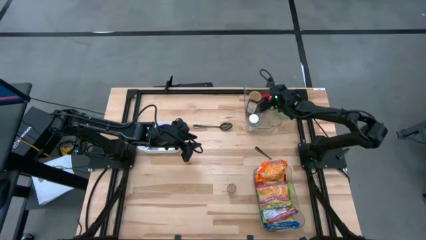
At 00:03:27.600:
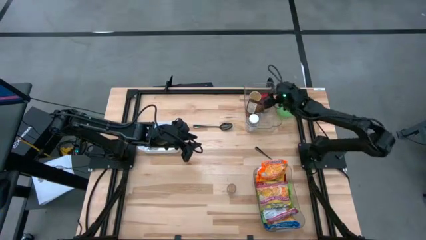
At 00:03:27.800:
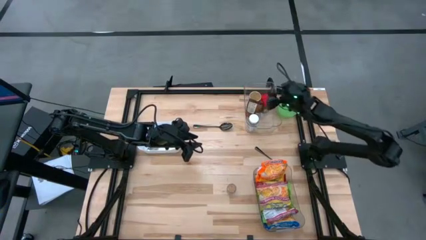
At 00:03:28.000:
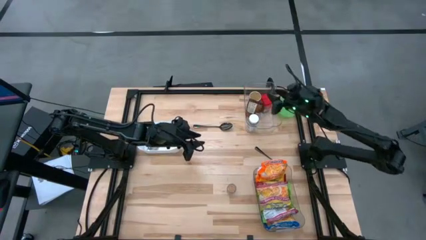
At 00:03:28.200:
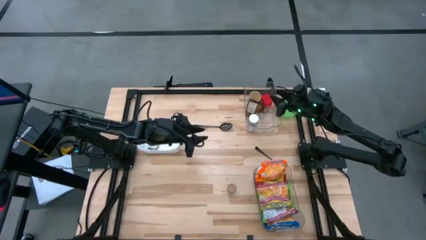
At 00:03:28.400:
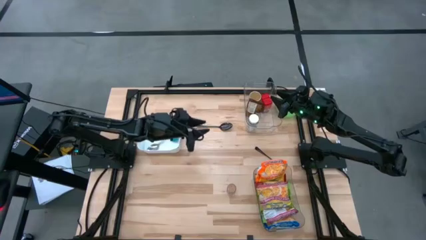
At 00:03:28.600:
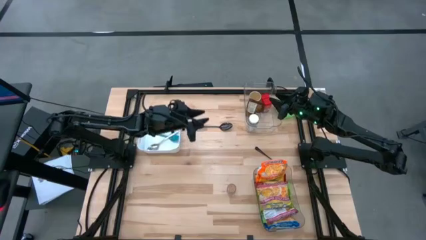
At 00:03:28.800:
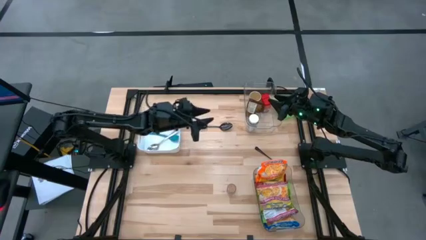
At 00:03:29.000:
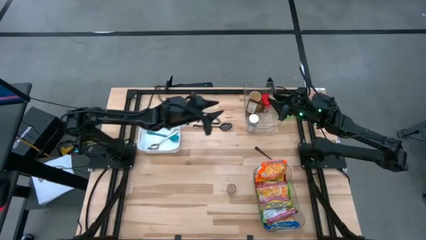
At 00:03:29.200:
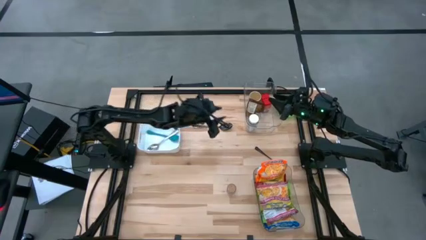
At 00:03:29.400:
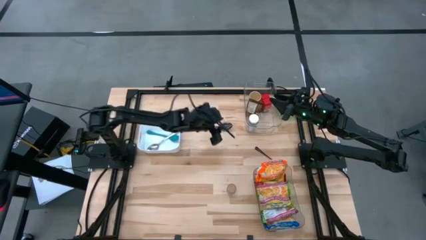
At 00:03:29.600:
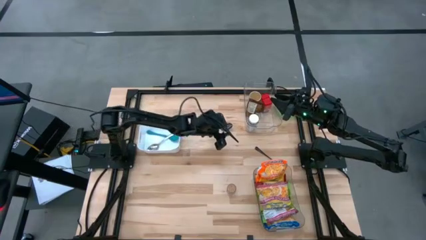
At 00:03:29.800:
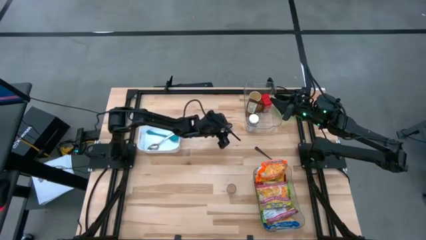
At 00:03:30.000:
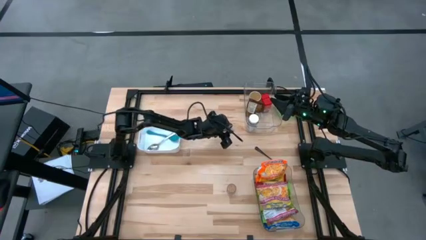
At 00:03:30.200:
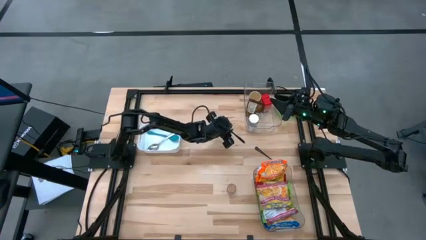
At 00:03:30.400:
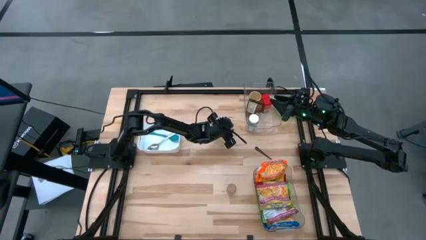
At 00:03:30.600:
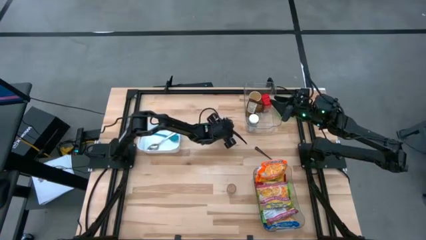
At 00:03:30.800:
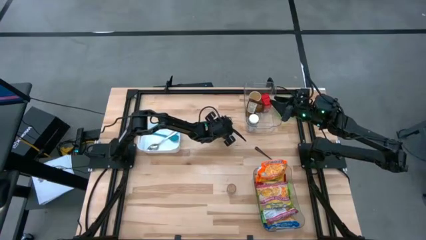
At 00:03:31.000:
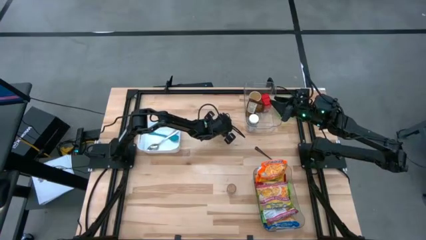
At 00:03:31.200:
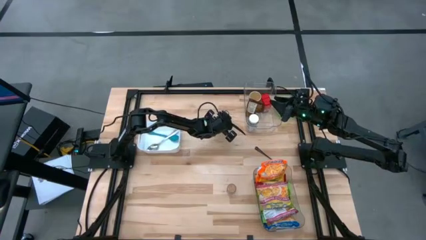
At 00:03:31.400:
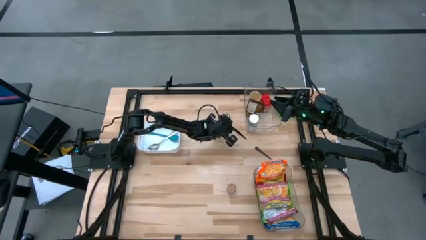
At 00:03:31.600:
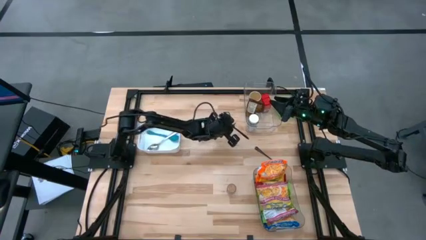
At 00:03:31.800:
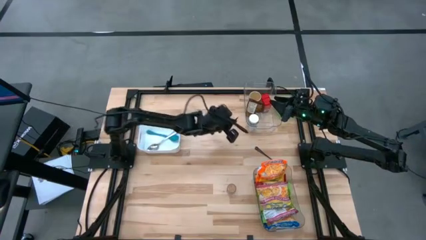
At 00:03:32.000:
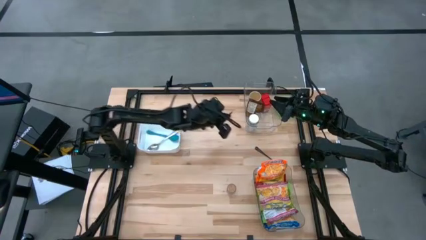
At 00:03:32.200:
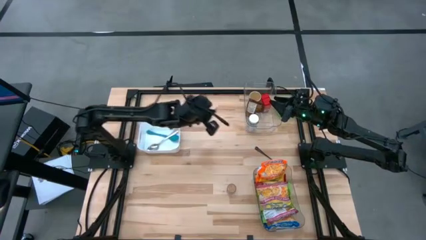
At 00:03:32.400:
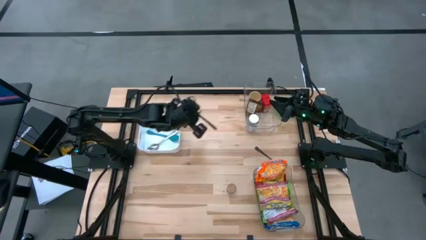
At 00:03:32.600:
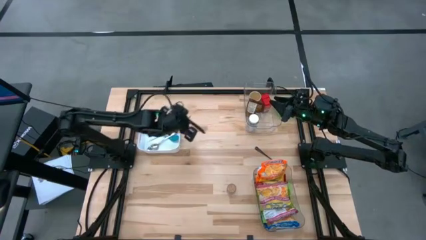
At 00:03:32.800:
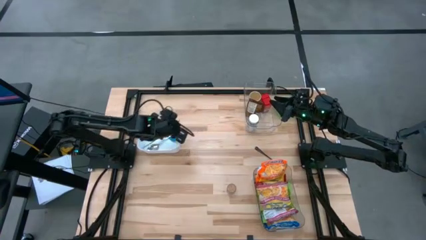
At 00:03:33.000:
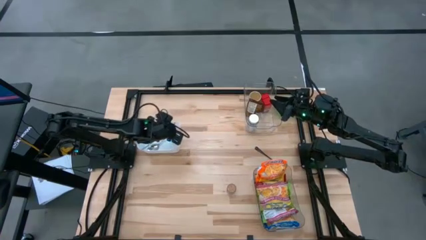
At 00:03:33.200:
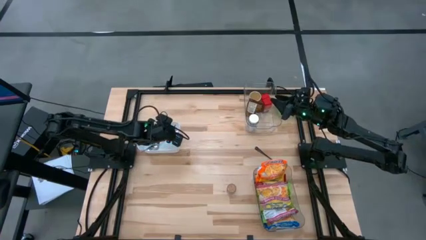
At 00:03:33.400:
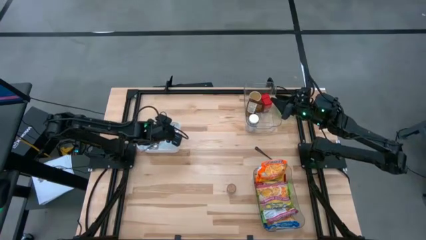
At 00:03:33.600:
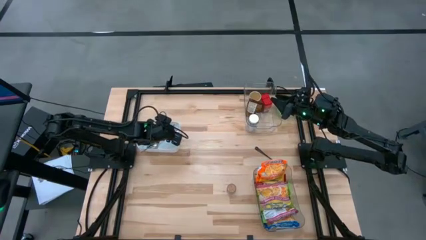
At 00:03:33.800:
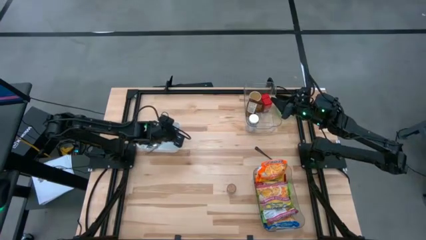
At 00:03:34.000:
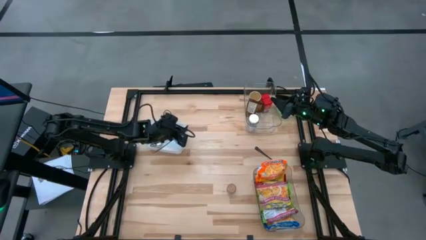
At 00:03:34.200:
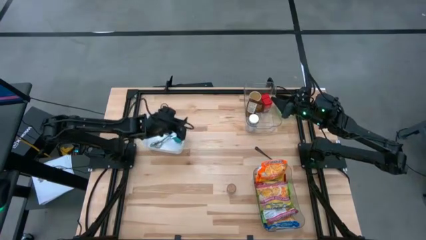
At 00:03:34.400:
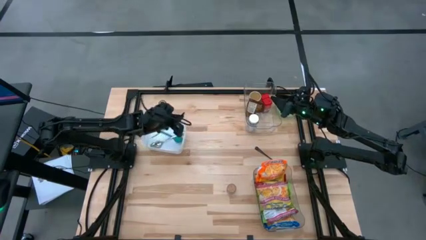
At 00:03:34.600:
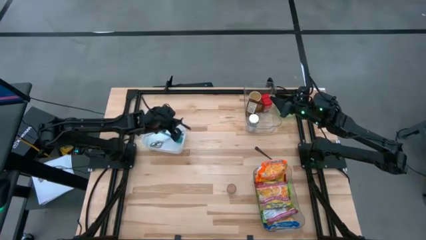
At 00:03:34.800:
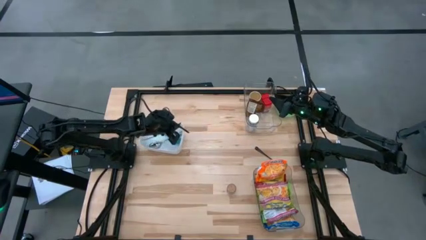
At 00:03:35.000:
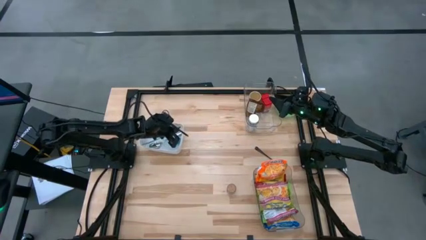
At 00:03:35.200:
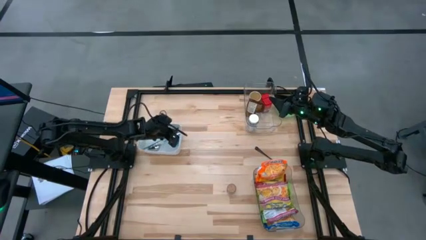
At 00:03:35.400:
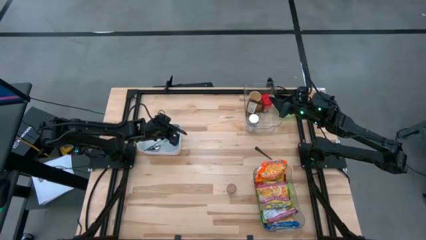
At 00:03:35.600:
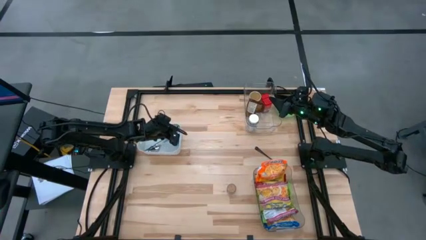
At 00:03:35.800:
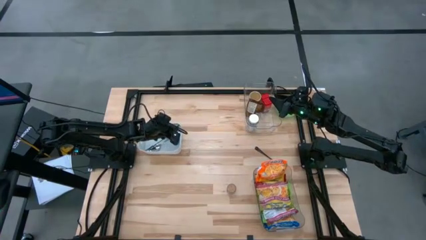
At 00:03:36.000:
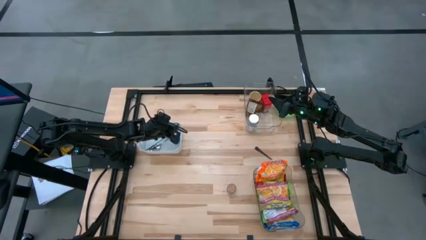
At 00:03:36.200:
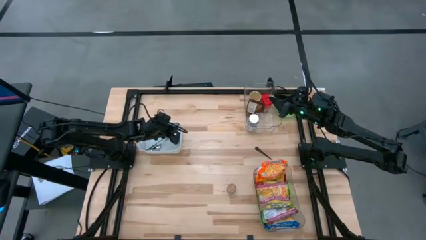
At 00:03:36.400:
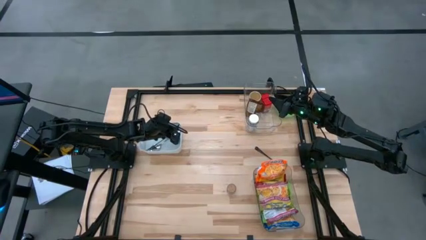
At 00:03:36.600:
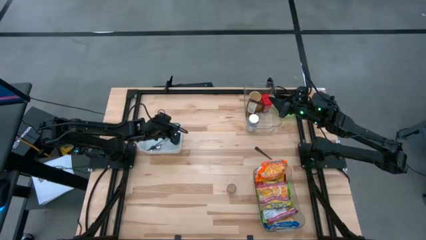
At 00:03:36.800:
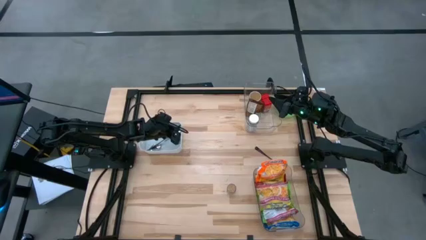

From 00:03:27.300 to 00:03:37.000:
Task: Pick & Place Food Item
Put the left black spoon into the white bin

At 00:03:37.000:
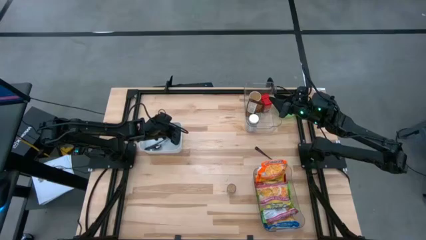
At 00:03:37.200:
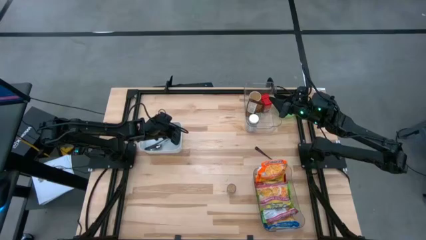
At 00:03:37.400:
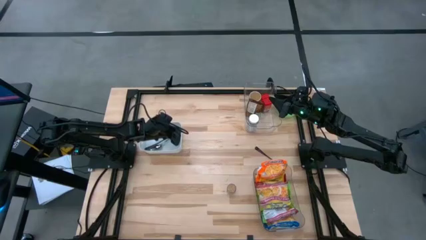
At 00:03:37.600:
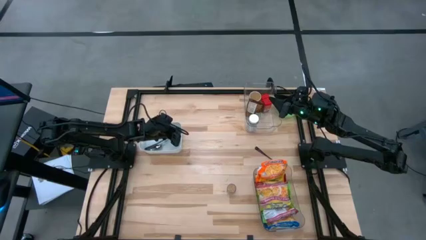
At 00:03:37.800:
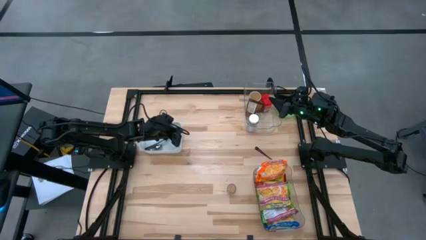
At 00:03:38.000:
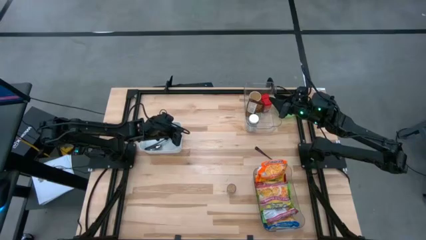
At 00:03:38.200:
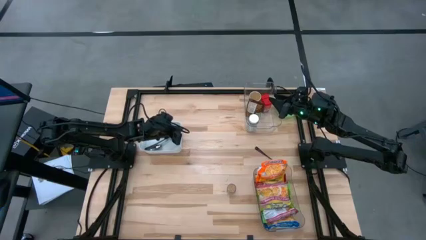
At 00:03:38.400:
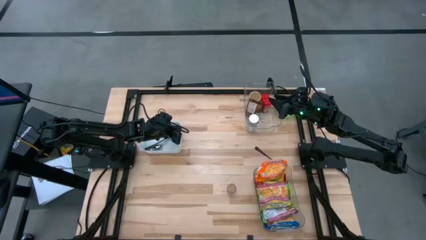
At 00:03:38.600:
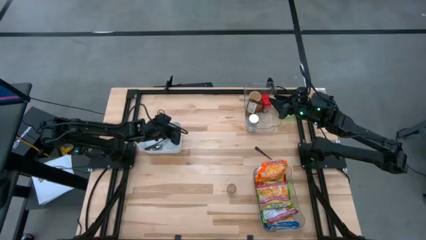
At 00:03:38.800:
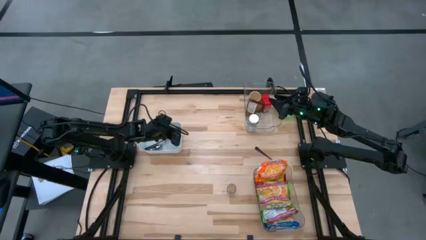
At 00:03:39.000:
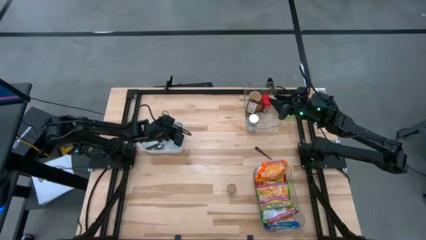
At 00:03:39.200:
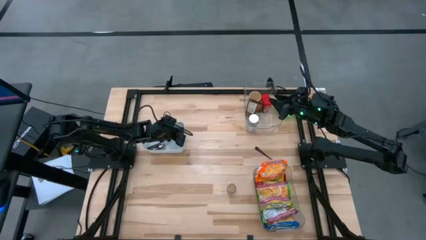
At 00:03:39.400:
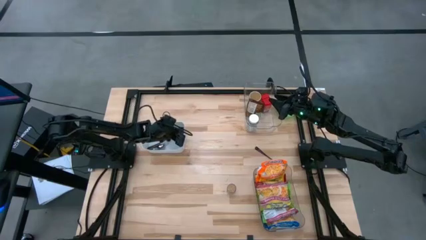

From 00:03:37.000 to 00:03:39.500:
Adjust the white bin

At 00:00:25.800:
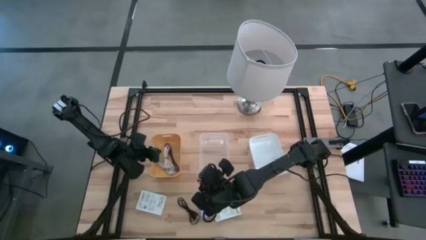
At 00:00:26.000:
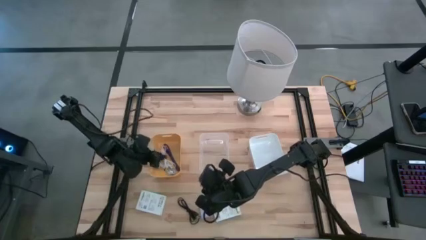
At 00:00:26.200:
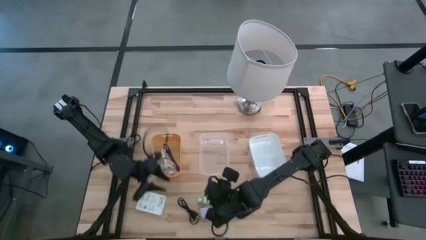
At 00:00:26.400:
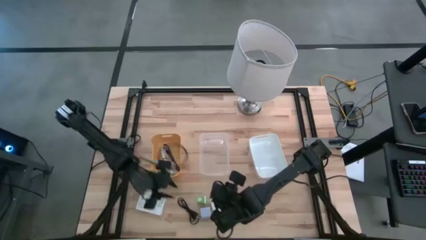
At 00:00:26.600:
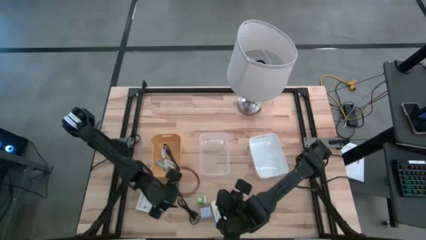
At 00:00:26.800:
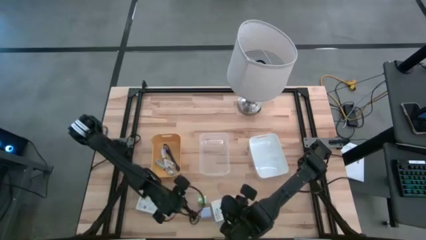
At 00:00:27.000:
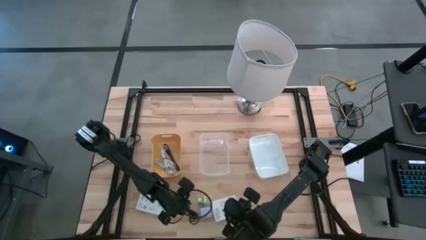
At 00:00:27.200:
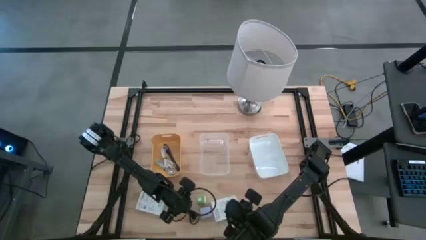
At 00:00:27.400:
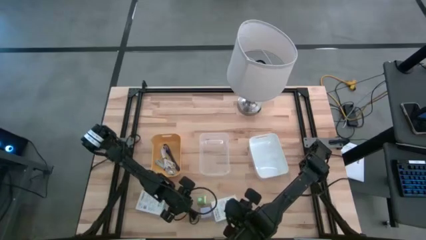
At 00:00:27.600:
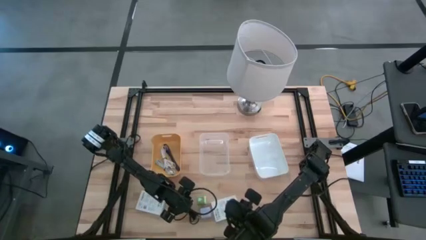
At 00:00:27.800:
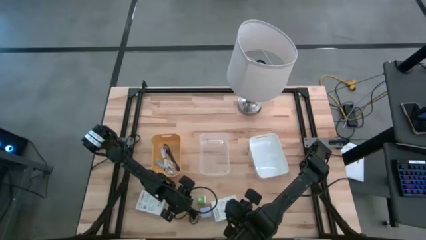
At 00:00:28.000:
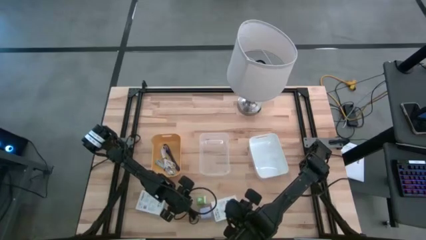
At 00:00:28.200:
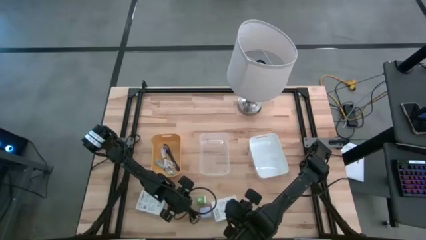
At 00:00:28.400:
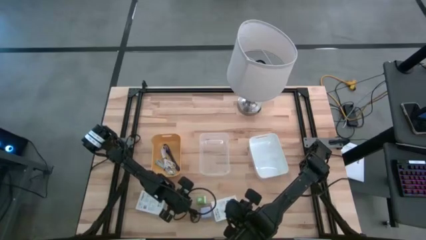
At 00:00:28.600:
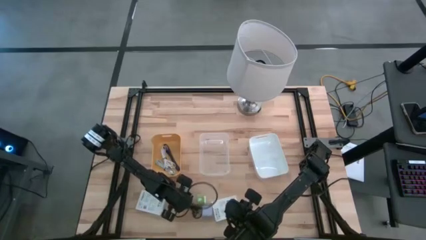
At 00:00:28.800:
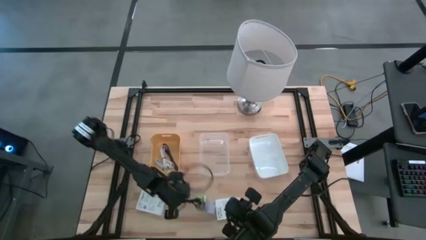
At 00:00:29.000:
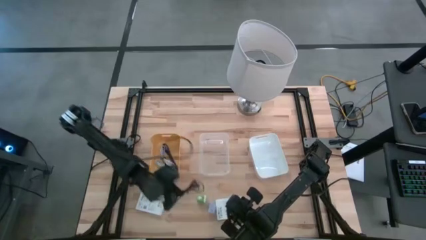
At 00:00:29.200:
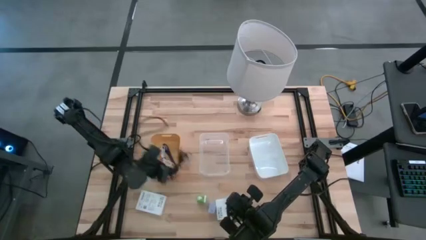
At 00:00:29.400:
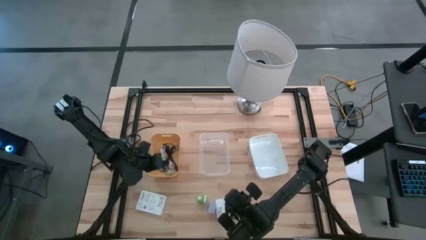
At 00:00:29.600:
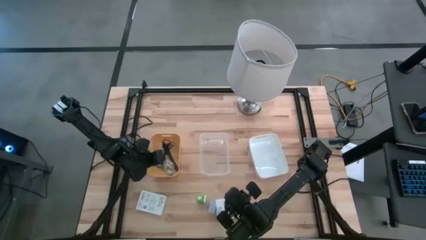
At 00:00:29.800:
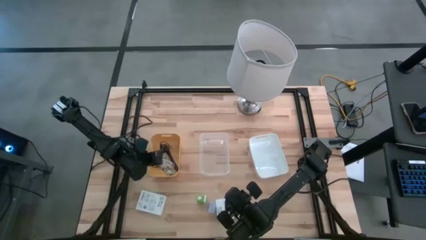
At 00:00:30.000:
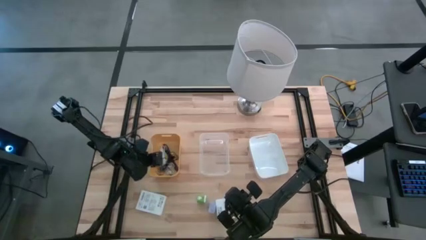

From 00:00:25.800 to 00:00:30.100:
Task: Pick and place items into bin
Put the black charger cable into the yellow bin
